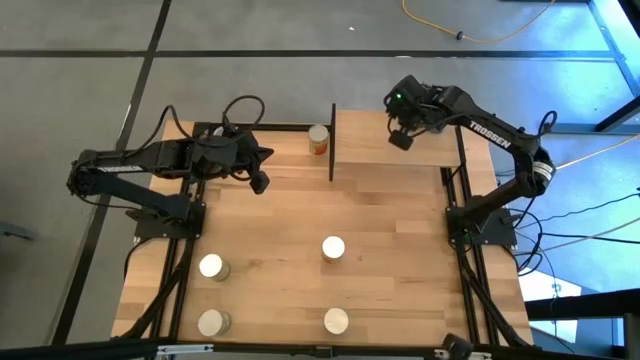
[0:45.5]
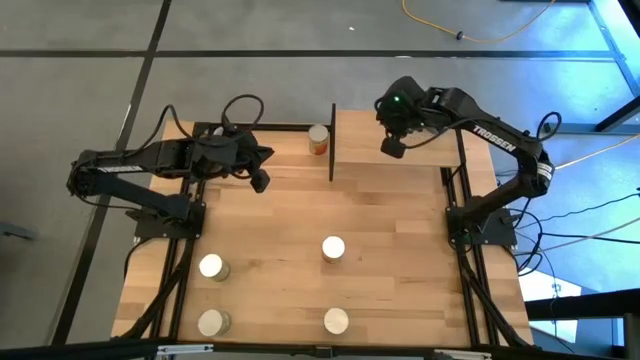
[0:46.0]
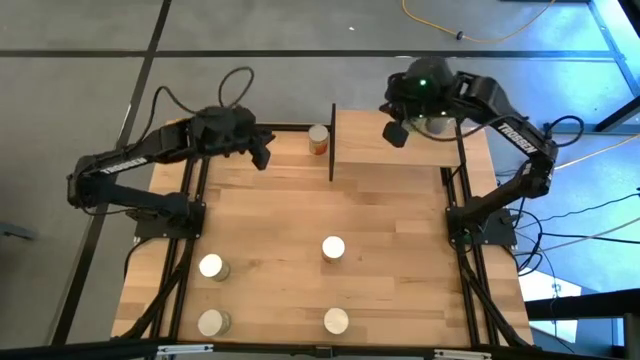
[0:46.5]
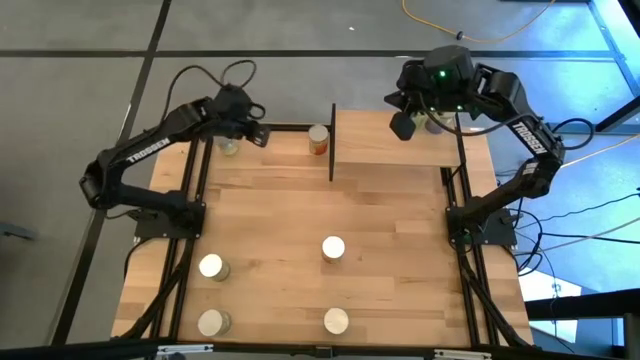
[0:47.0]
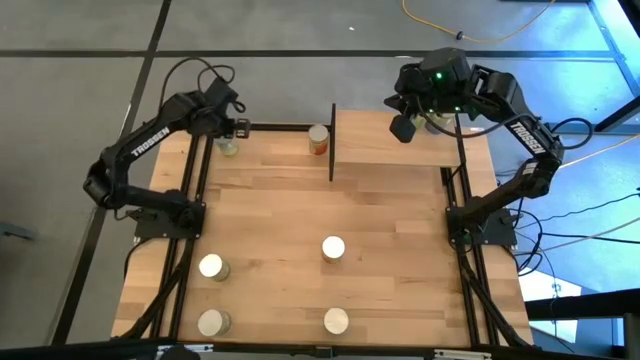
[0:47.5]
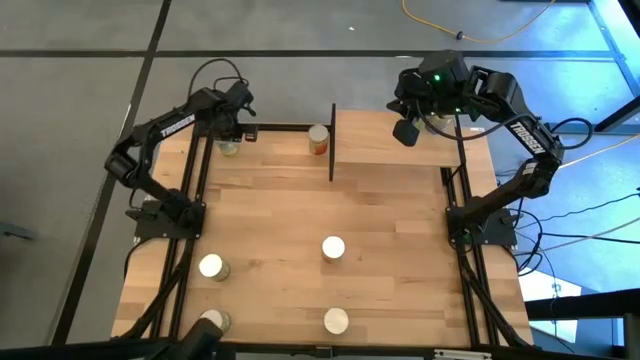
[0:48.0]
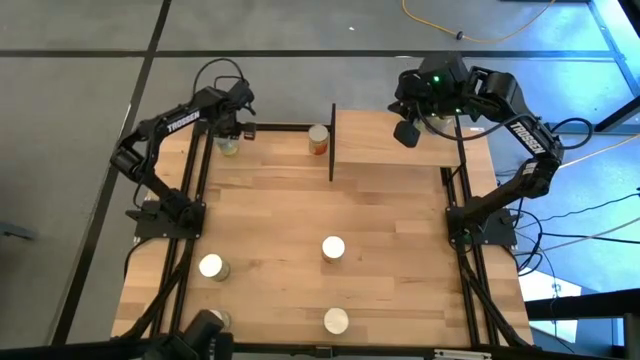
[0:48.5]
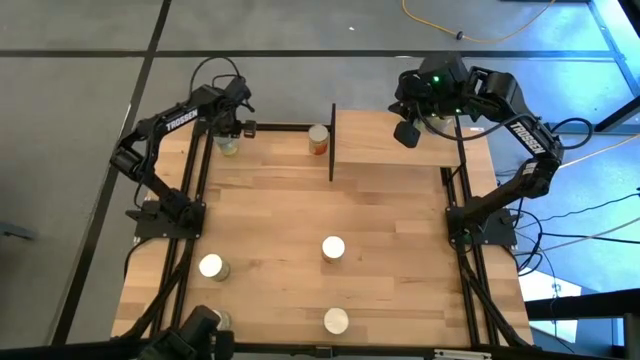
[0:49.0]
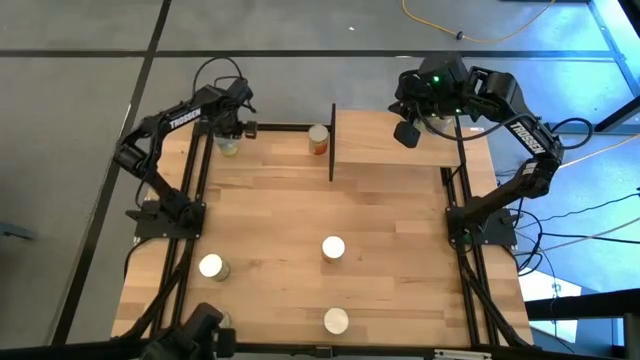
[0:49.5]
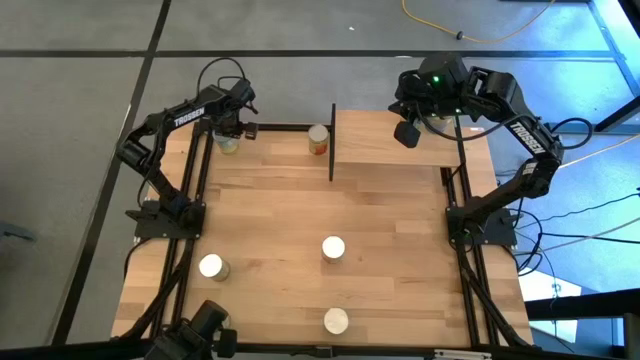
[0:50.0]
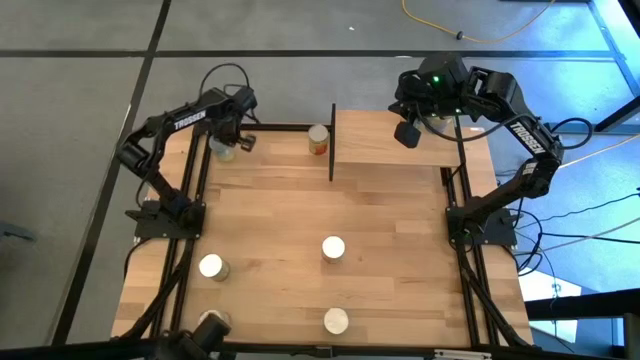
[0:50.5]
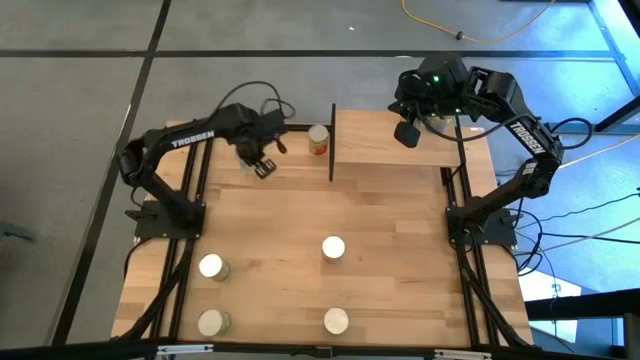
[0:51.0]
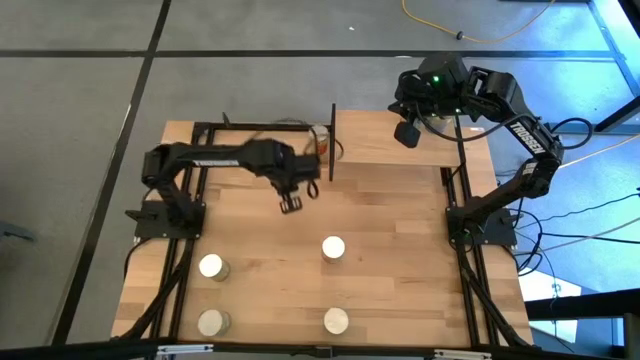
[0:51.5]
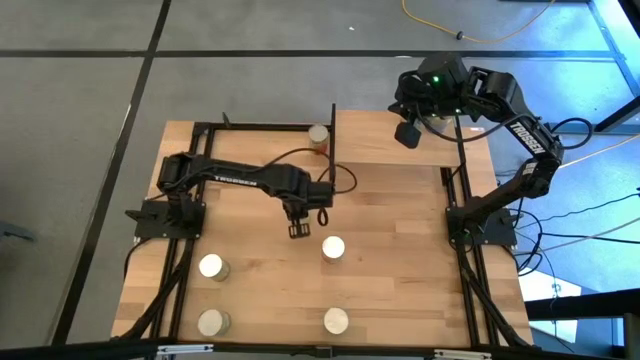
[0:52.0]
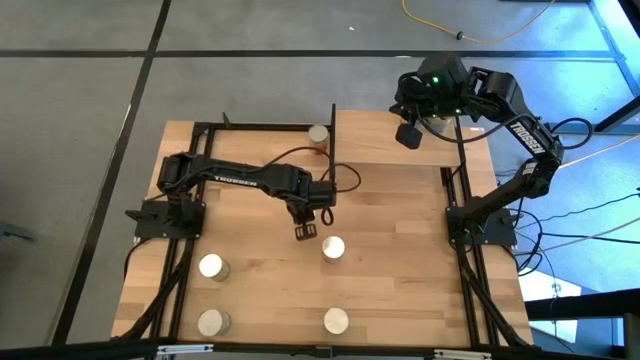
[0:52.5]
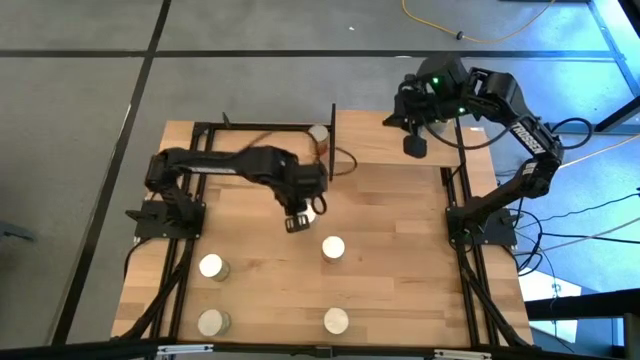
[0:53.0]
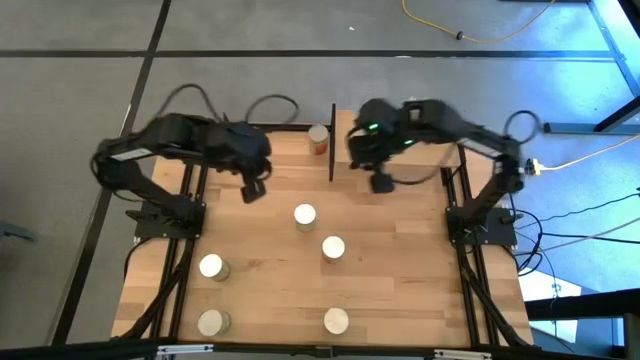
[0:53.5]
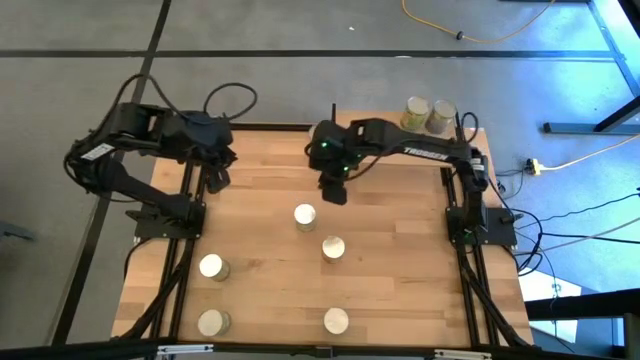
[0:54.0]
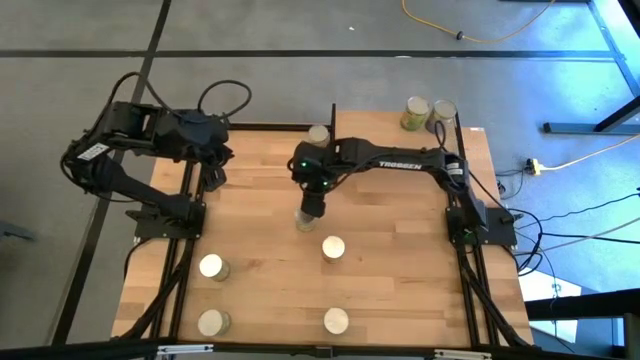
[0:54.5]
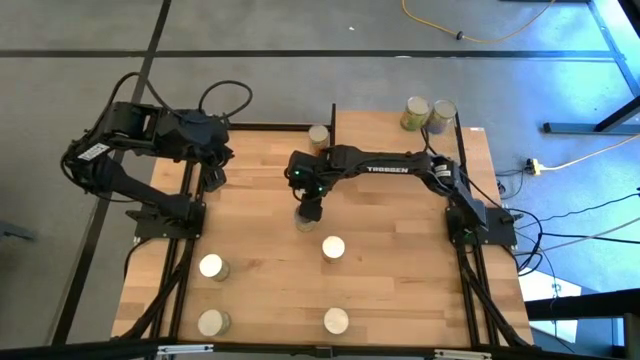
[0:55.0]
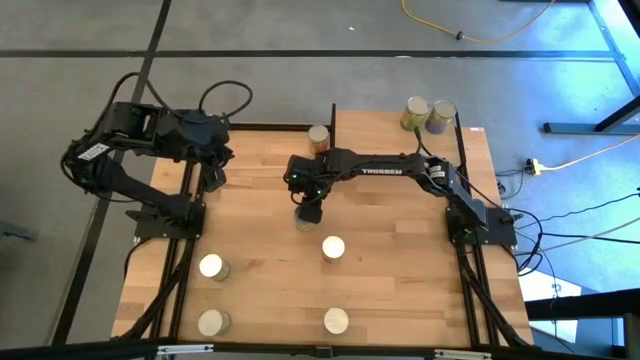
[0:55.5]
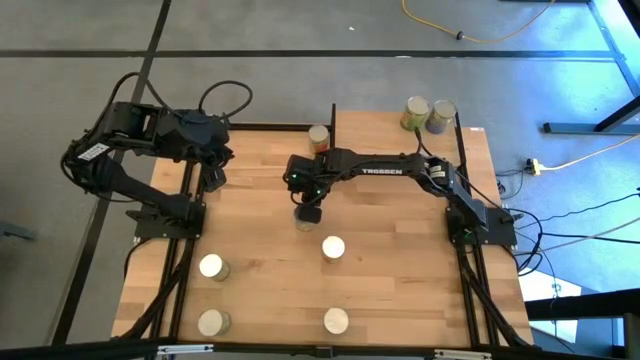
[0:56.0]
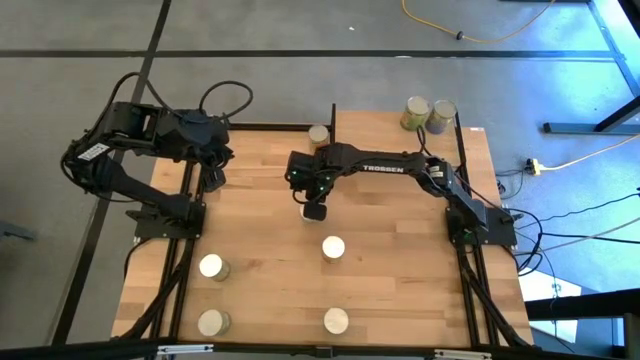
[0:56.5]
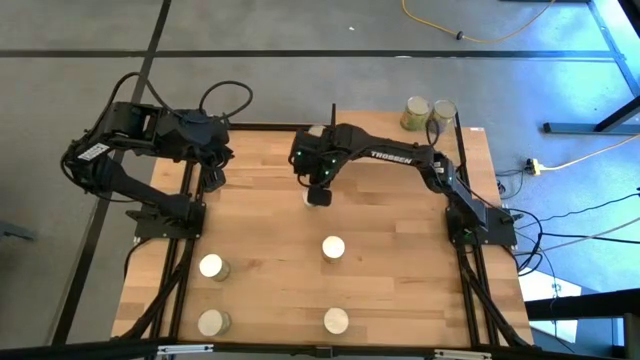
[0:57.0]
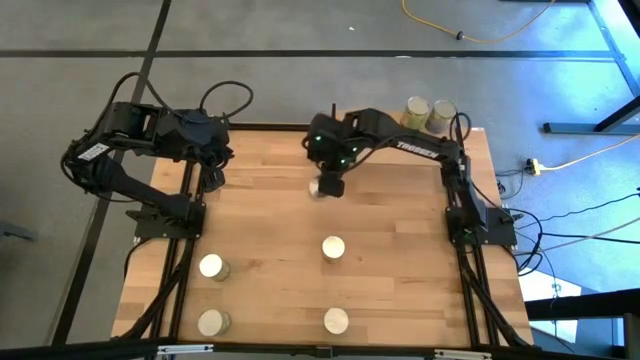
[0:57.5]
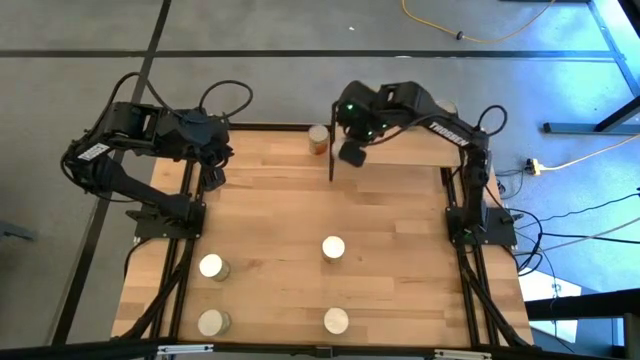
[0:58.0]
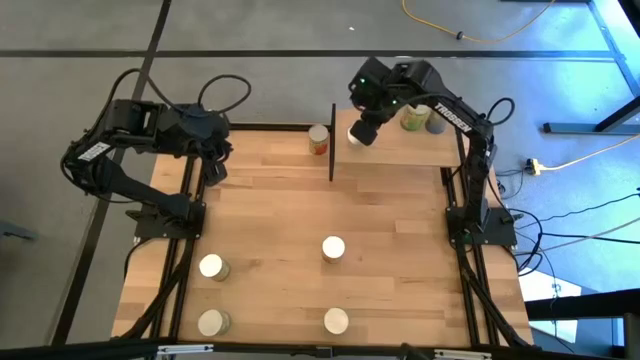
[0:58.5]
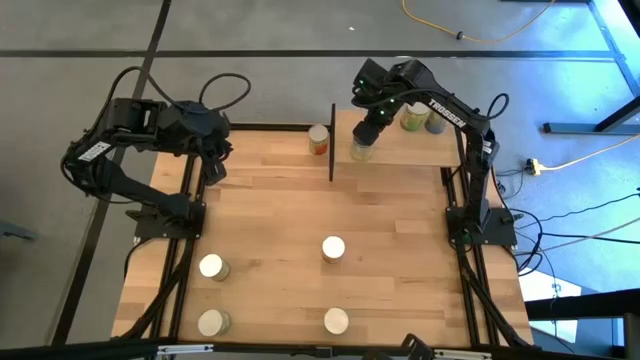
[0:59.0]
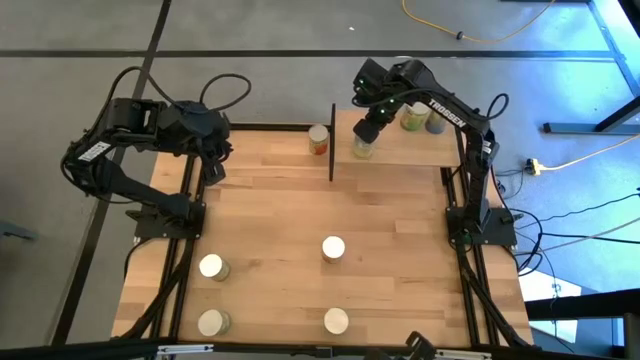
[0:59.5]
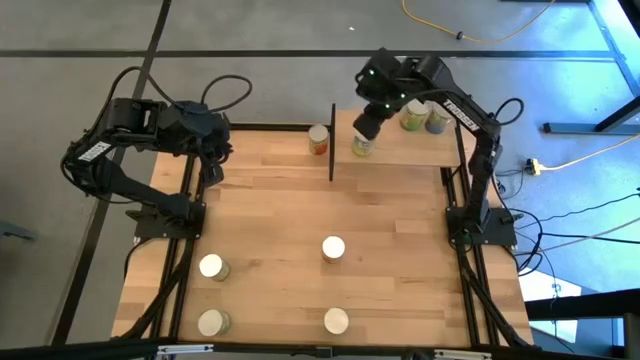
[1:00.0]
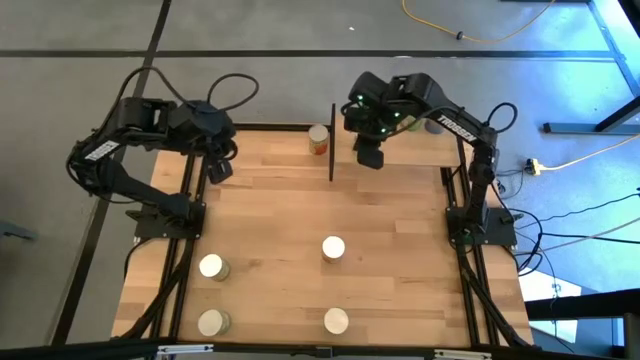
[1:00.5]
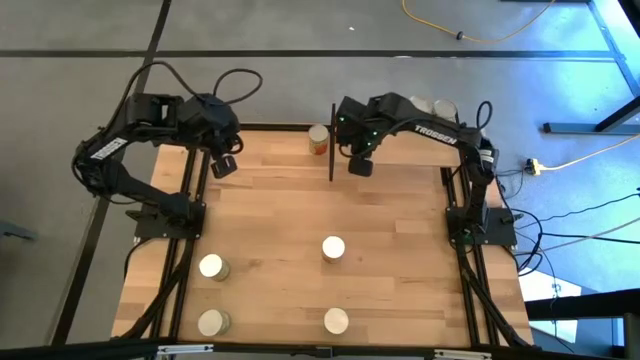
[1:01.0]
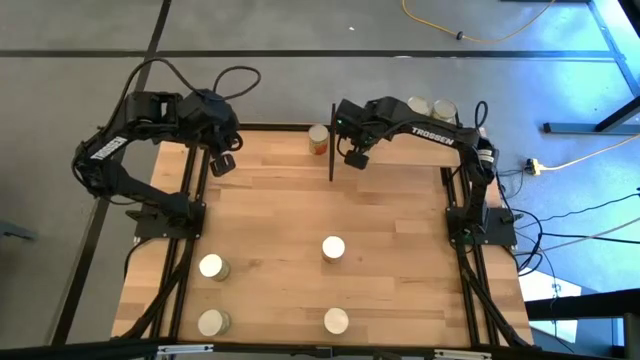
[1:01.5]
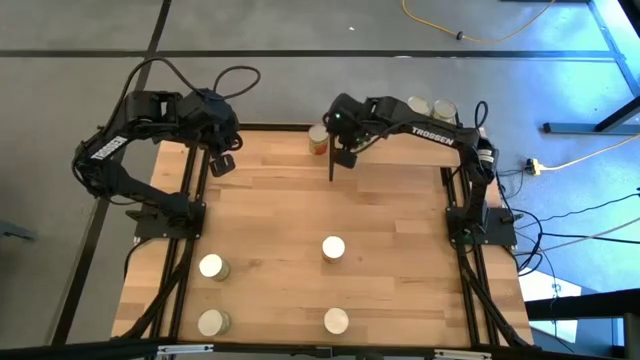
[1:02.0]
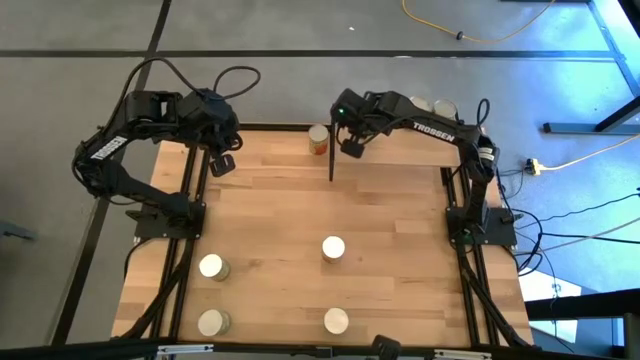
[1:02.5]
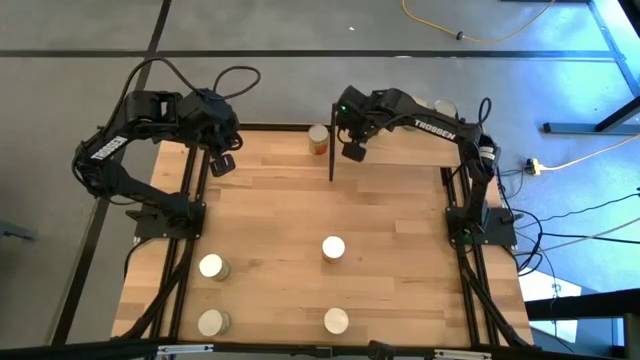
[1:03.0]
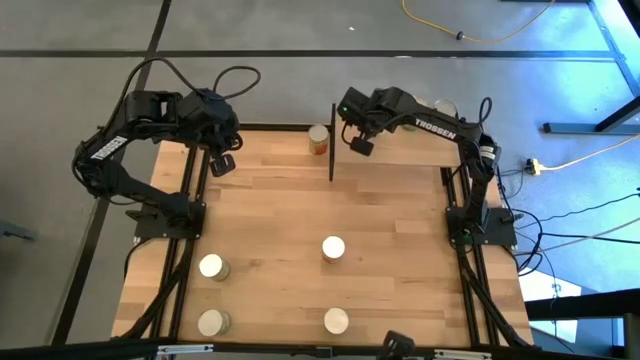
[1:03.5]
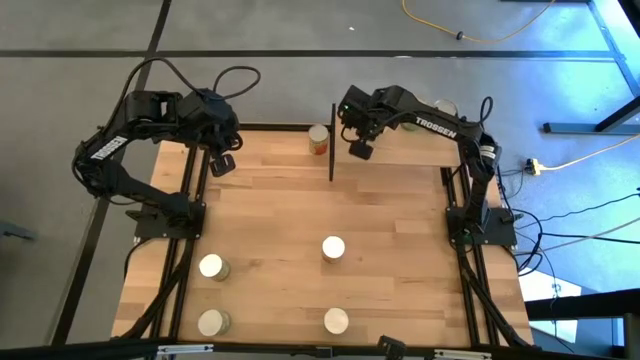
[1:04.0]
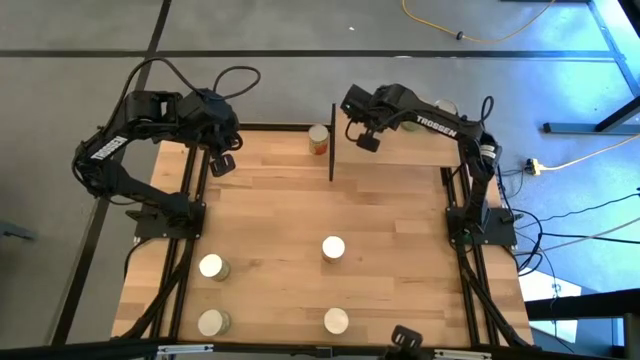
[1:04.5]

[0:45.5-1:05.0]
Task: Pick and place cans onto a shelf
Put the canned carrots on the shelf

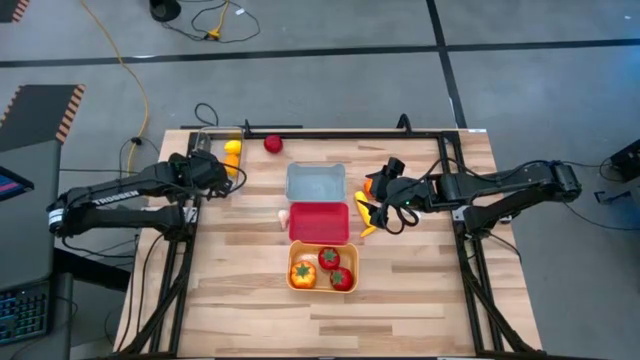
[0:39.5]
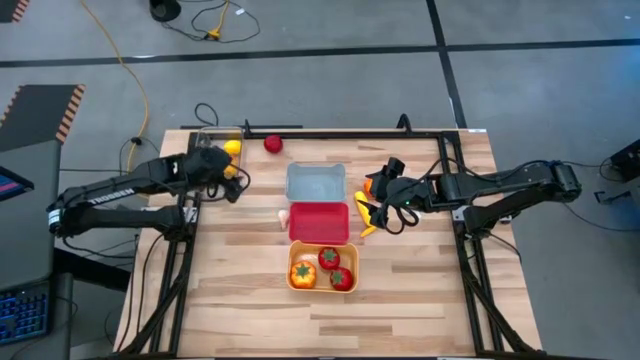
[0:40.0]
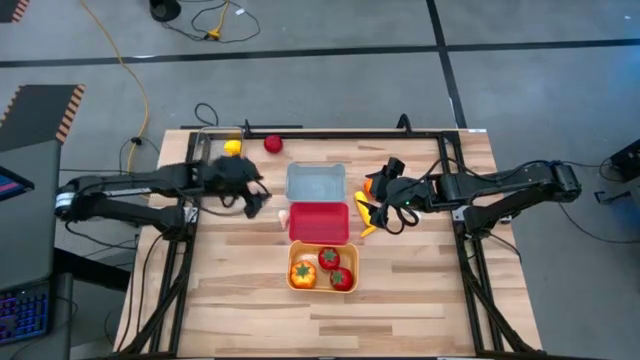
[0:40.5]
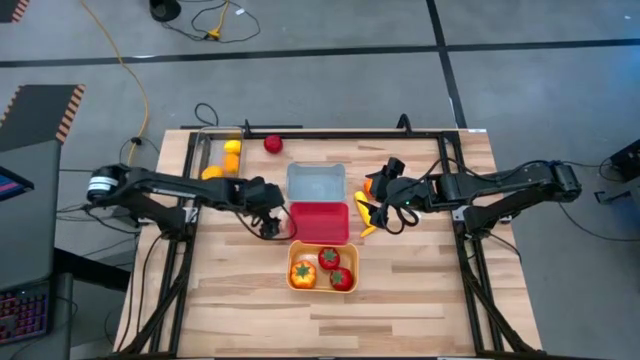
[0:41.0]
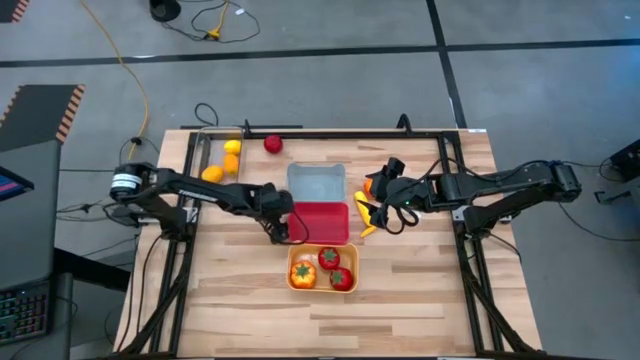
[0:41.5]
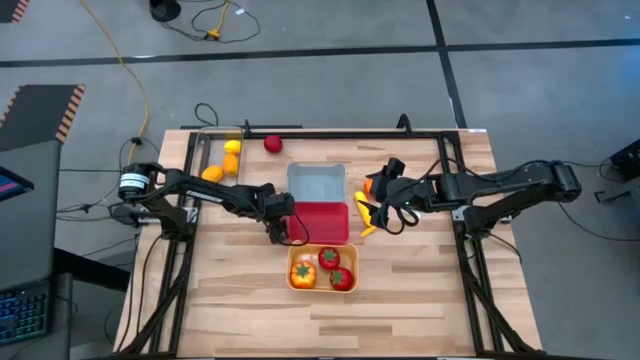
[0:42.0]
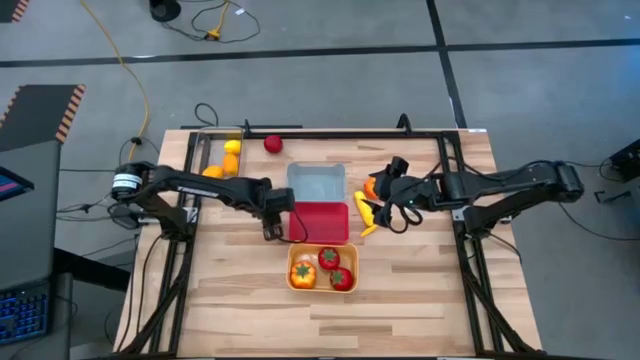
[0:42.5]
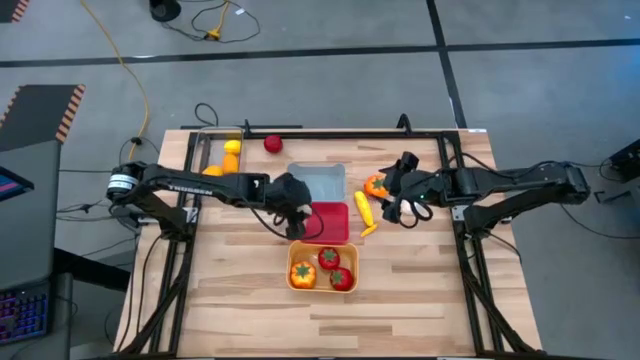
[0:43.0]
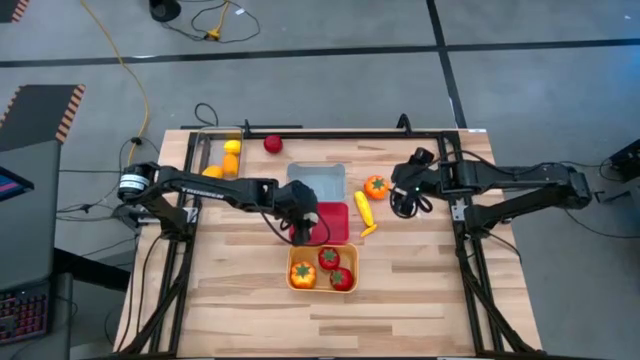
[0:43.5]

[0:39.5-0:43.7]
Task: Sort produce into baskets
Put the left white garlic into the red bin
